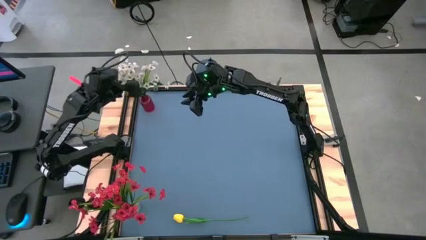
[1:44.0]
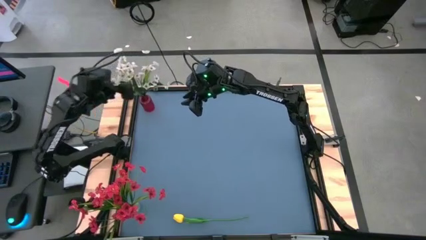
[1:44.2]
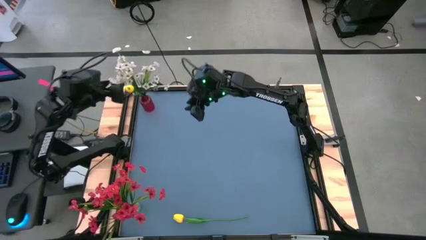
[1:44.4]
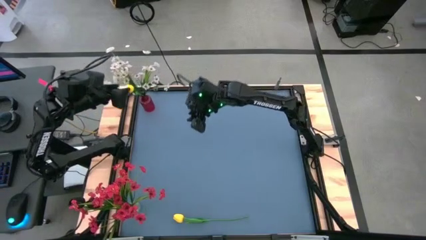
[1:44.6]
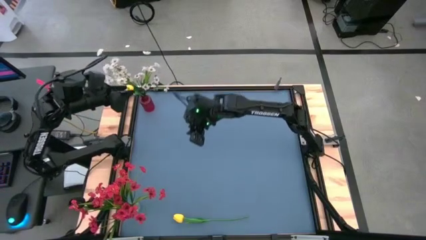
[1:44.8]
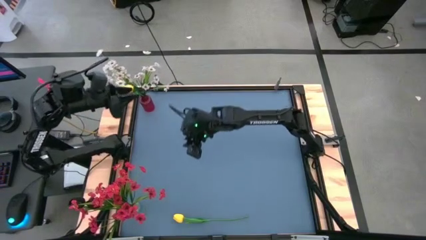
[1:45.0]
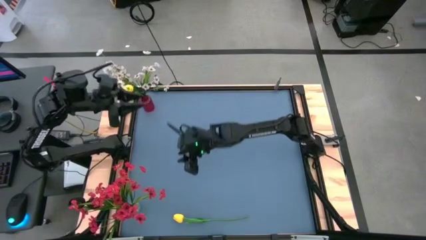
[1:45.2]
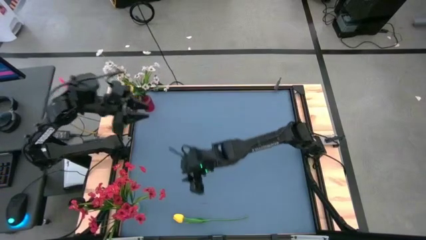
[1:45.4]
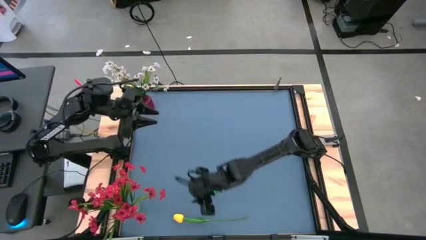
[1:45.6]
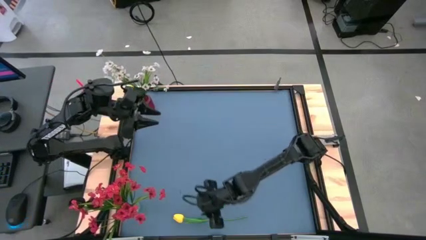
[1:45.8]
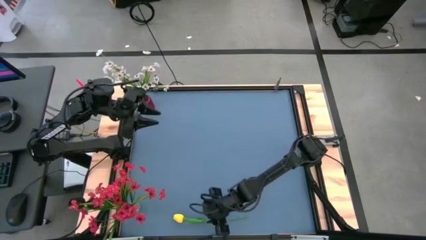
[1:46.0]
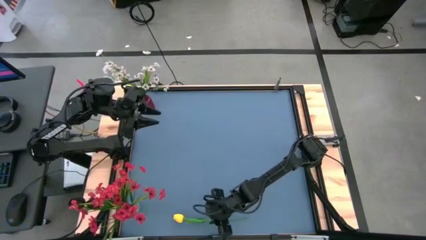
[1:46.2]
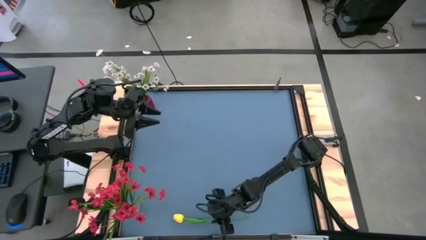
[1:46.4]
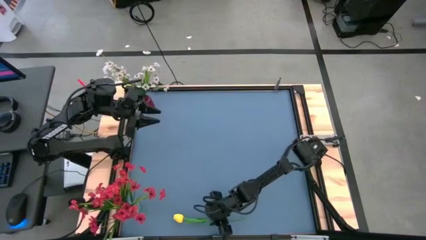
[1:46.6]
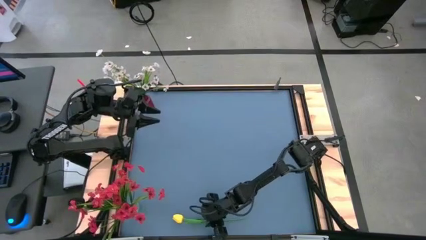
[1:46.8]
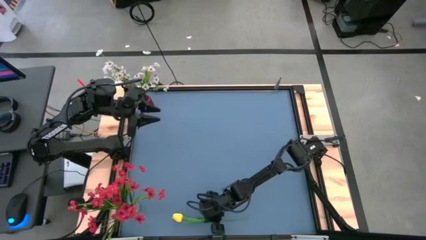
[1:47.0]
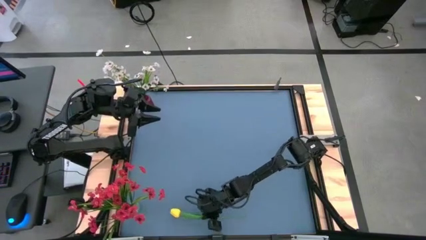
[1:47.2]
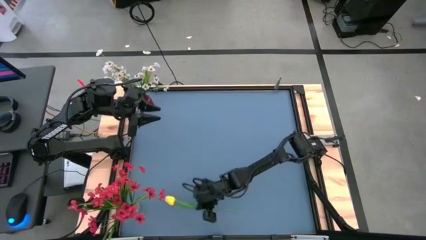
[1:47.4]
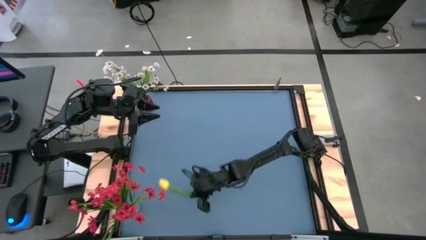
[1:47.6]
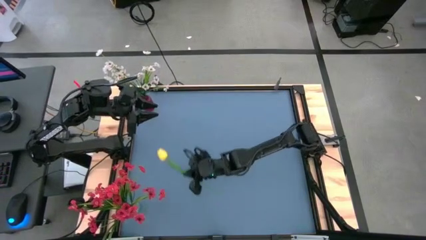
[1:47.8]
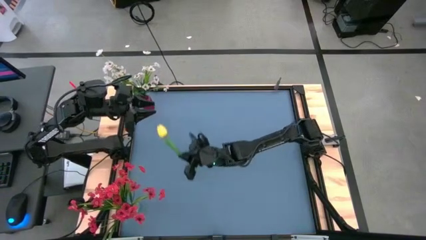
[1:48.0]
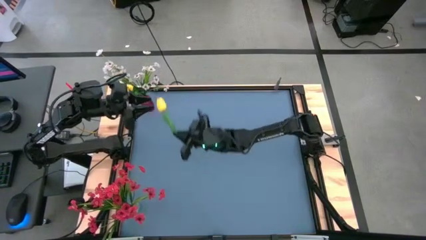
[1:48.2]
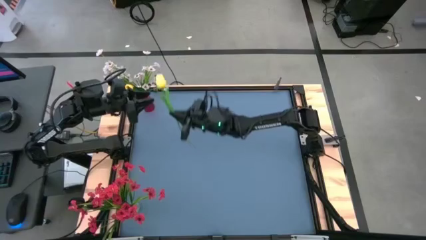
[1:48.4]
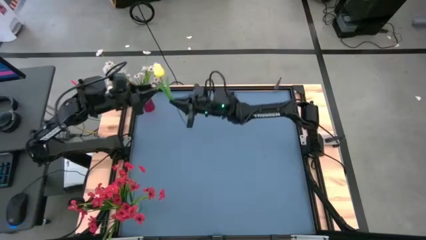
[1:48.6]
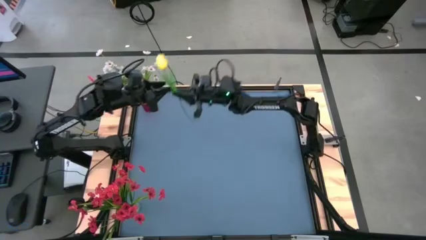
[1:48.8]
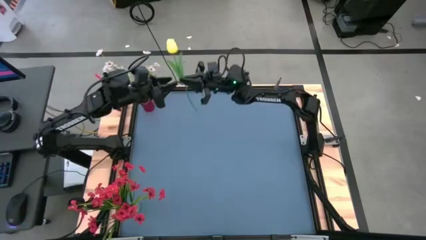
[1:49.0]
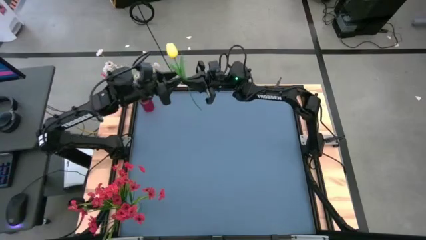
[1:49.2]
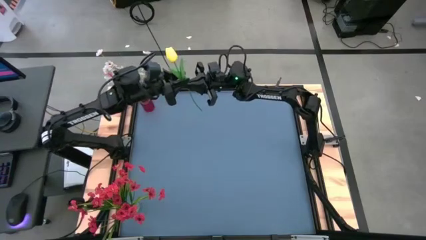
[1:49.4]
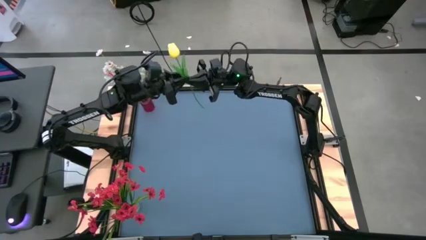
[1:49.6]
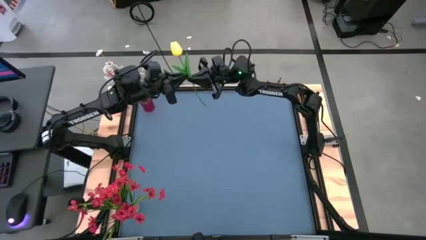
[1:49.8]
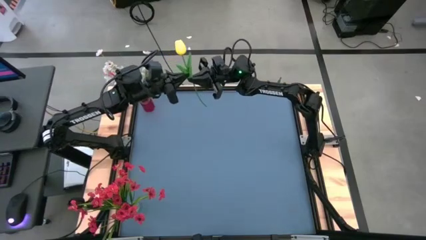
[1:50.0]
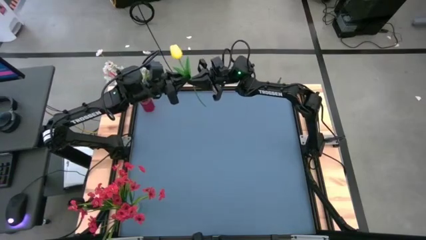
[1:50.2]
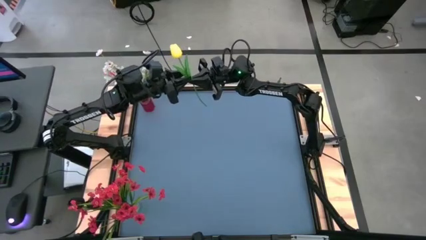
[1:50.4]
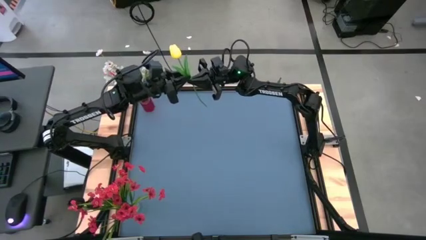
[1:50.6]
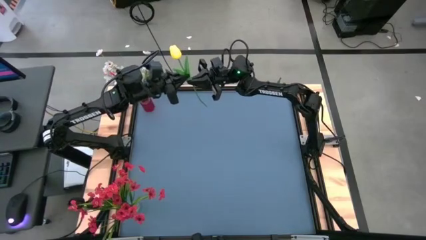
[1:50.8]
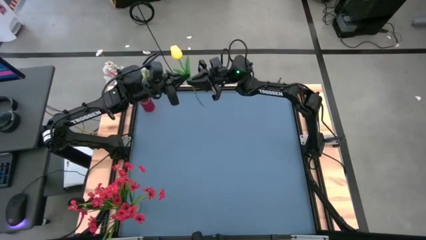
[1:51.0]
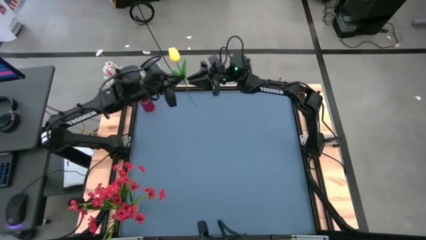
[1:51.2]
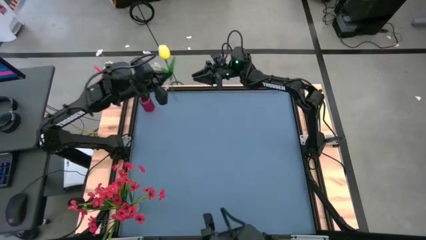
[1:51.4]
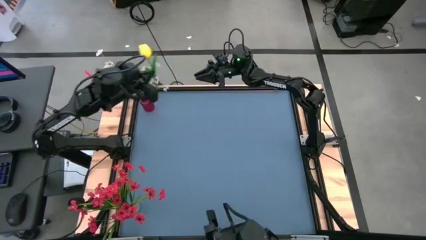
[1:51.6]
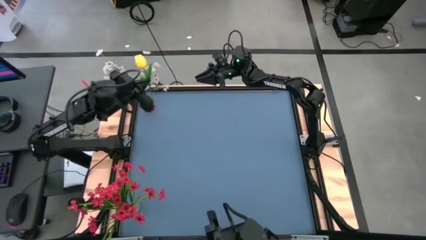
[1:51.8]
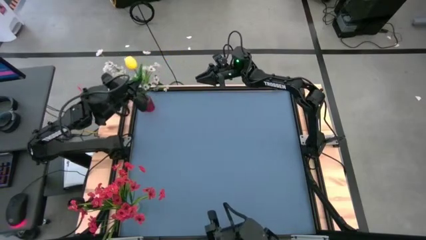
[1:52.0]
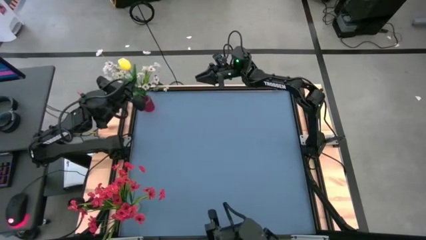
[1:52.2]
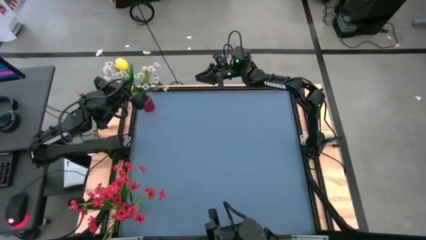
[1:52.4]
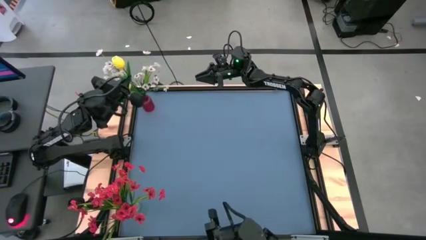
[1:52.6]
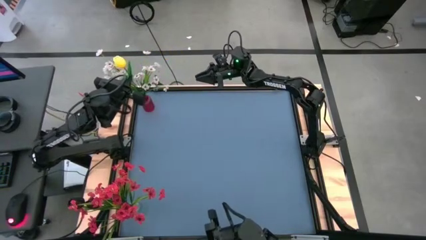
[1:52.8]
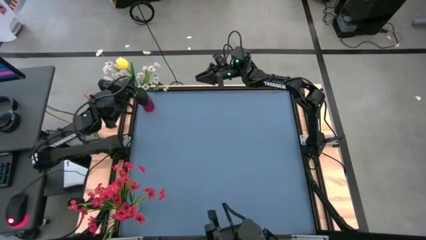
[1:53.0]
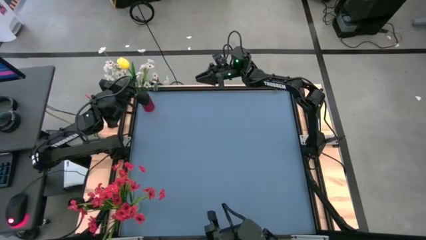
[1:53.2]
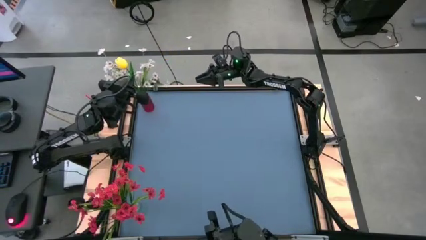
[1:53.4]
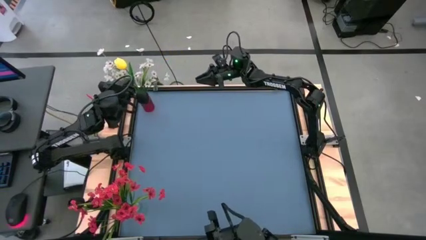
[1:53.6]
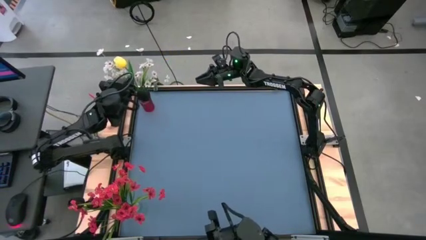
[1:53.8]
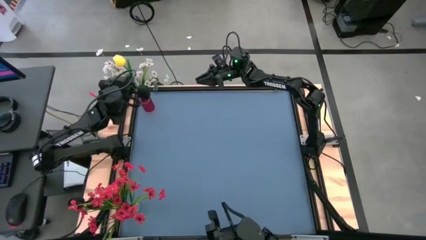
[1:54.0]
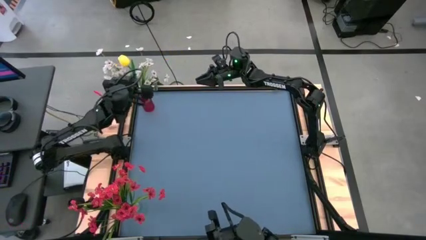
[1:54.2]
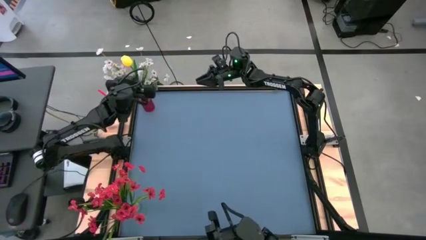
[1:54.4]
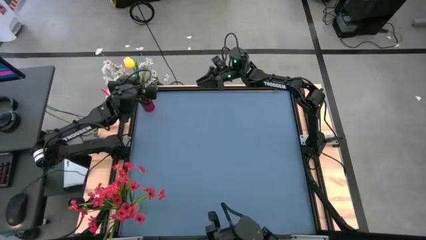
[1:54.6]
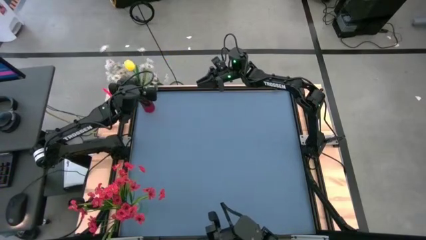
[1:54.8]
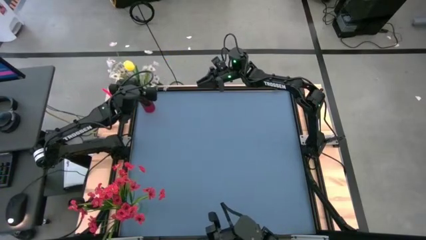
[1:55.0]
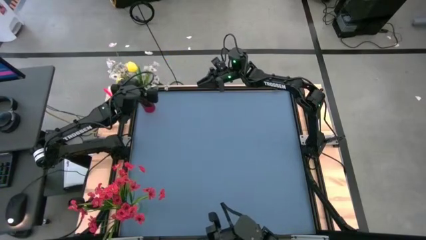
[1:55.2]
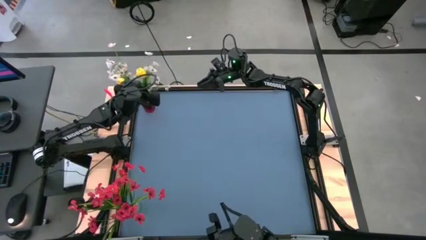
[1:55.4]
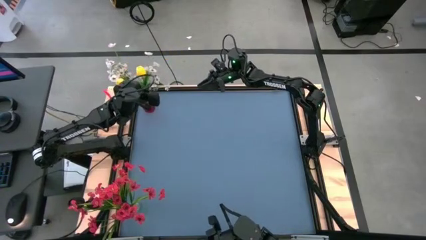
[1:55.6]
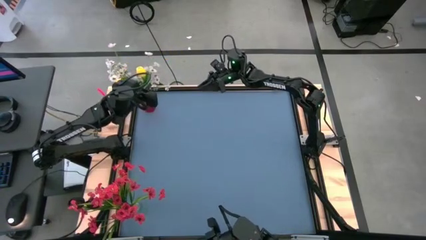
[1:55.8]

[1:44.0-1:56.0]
Task: Sort flowers into vase by color
Put the yellow flower into the pink vase

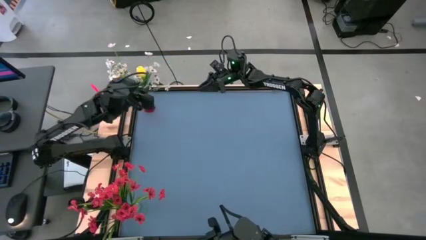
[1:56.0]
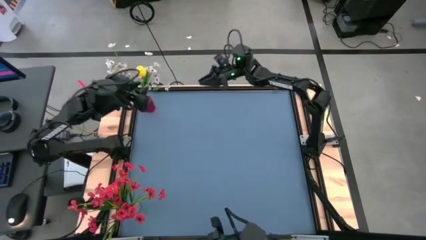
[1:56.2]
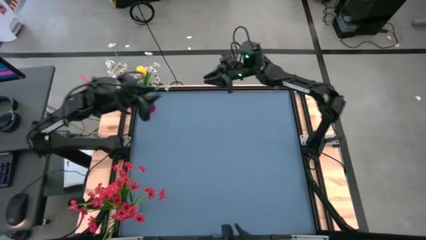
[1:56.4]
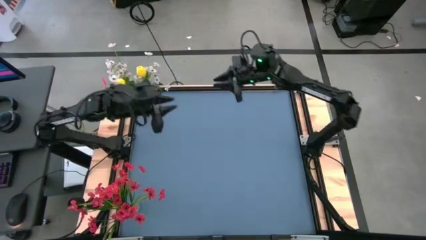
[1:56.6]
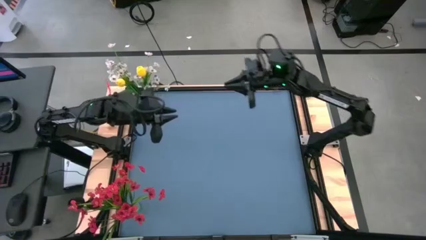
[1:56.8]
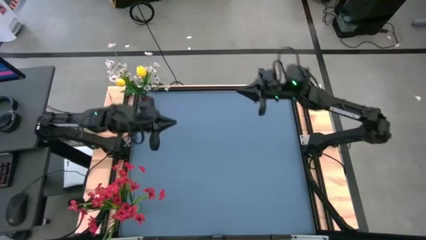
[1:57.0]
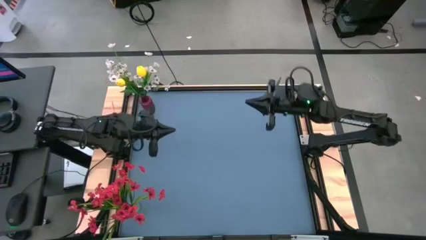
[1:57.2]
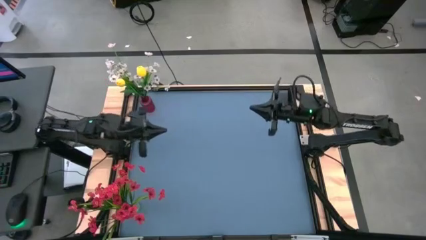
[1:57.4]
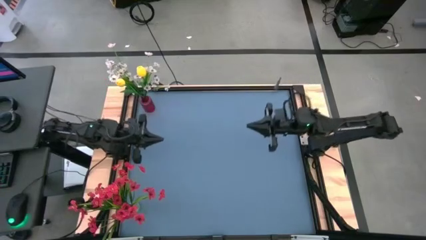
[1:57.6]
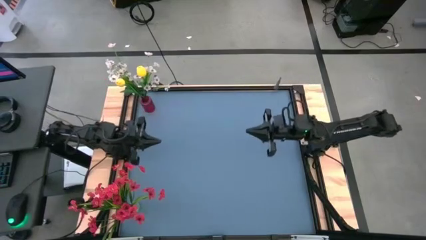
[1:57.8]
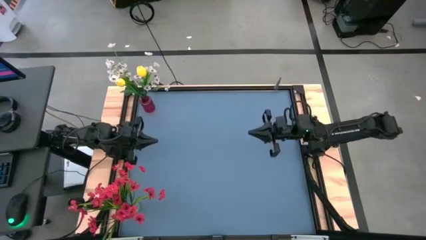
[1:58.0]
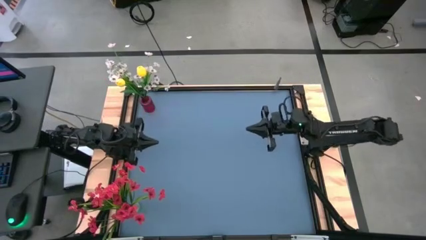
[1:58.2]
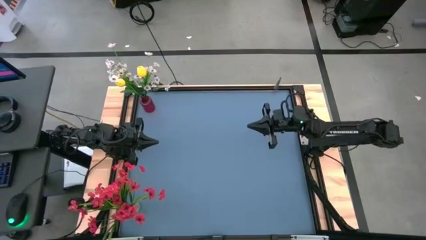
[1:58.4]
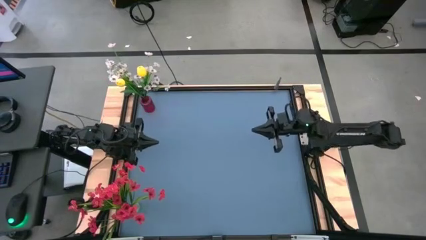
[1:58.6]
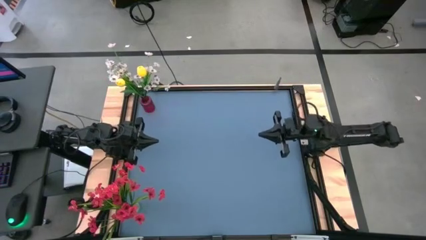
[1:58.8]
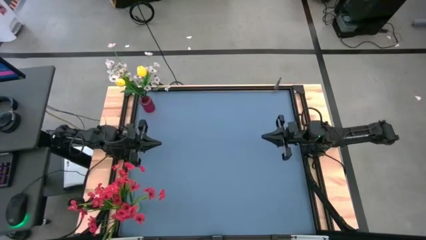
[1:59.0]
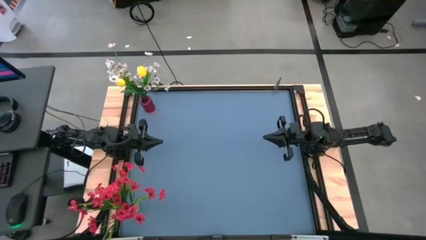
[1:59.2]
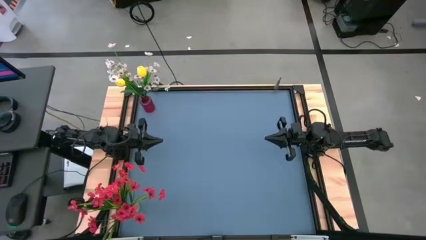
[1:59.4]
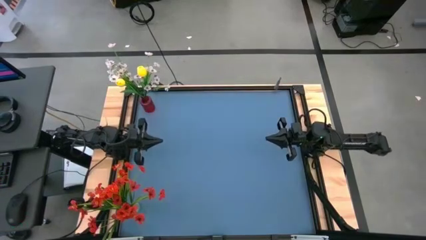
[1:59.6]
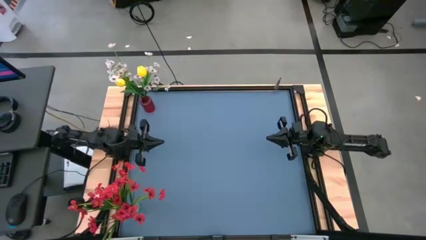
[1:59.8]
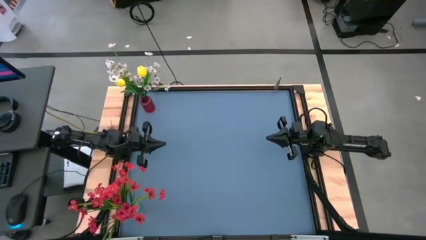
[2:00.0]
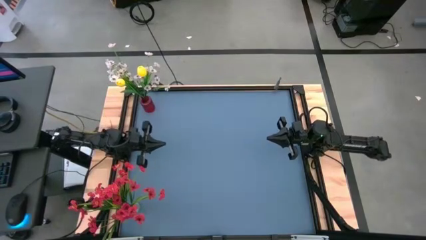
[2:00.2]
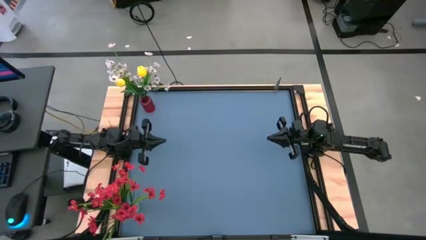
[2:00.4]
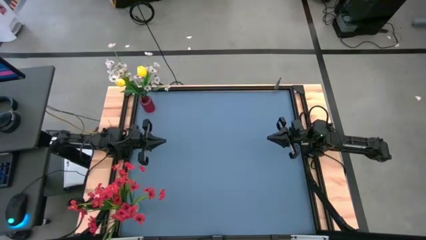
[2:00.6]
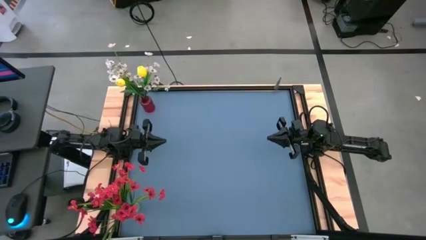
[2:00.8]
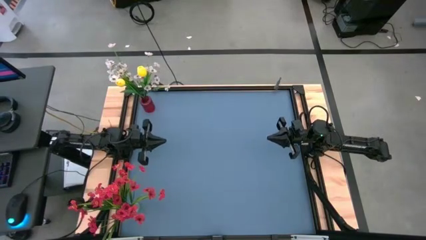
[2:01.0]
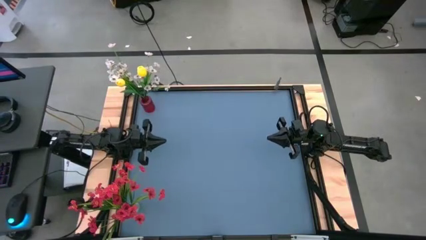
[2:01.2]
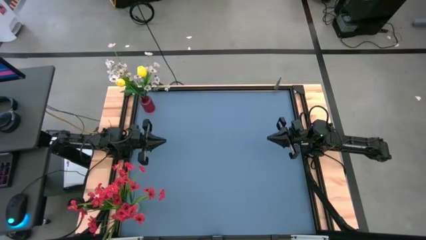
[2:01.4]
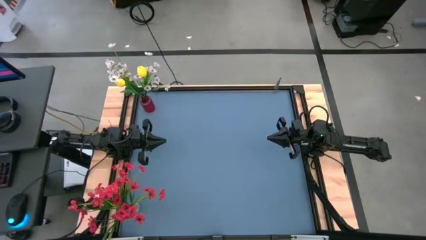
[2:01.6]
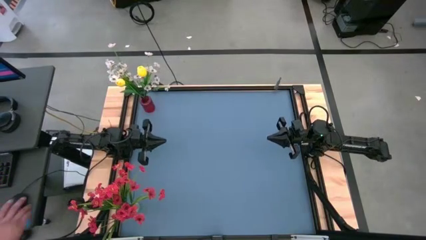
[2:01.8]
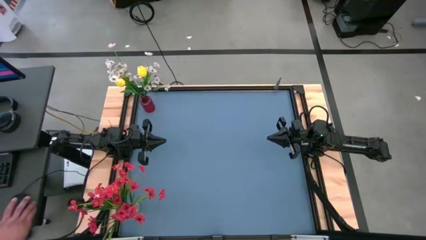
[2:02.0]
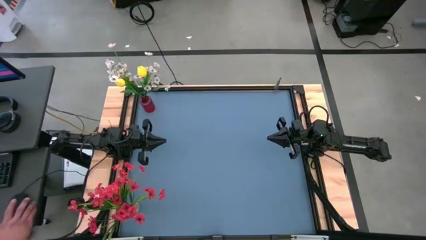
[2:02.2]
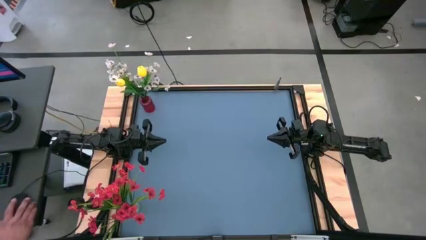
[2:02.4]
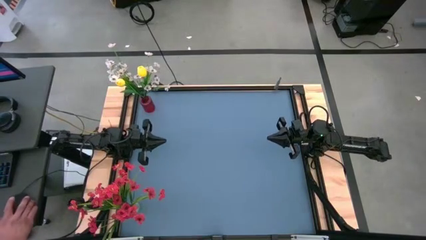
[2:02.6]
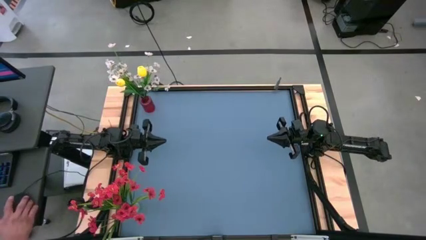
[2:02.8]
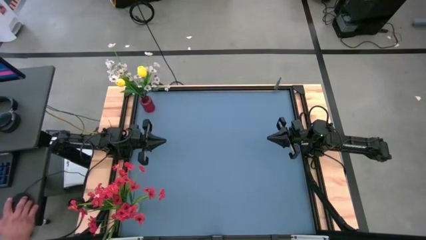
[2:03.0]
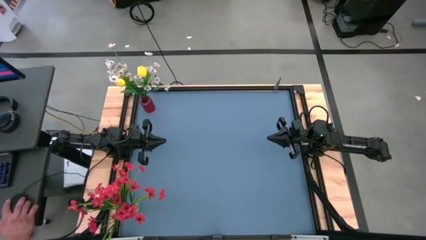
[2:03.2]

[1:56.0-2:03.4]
Return to Home Position
